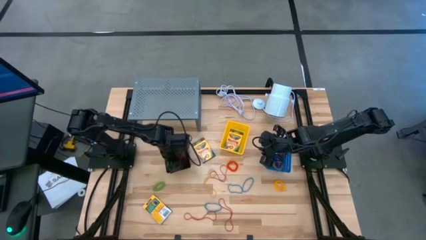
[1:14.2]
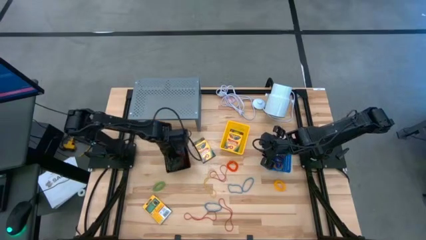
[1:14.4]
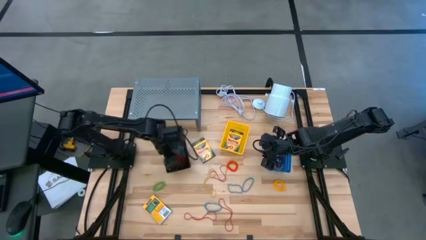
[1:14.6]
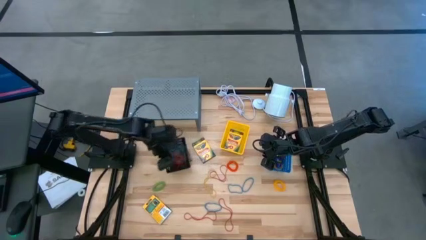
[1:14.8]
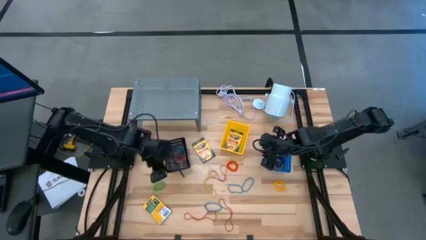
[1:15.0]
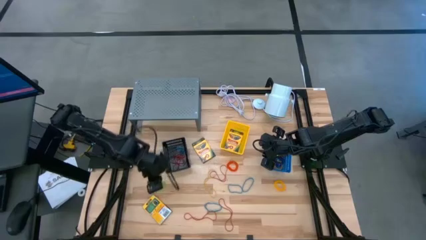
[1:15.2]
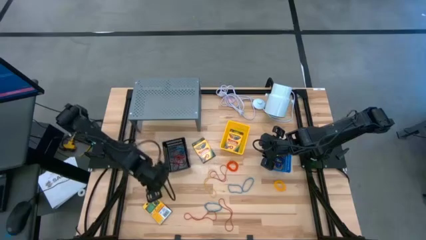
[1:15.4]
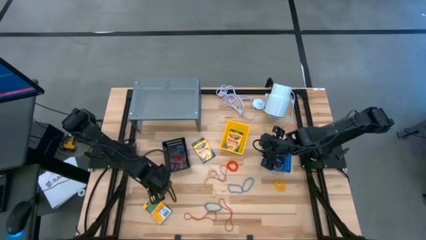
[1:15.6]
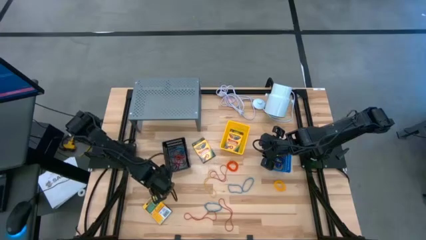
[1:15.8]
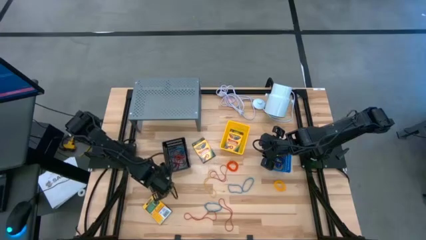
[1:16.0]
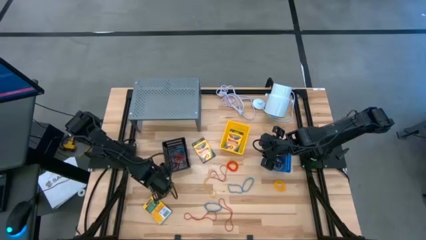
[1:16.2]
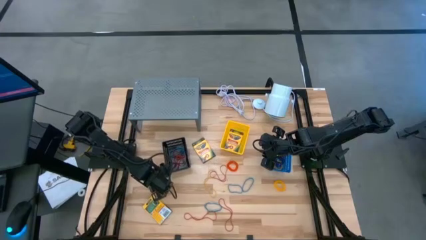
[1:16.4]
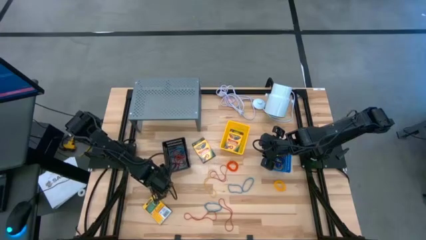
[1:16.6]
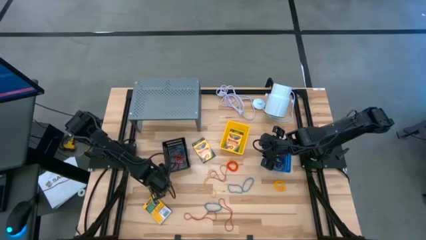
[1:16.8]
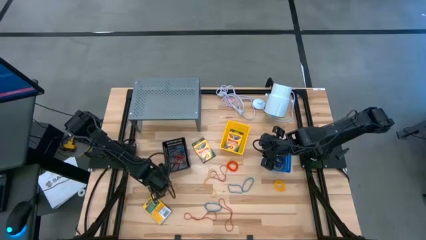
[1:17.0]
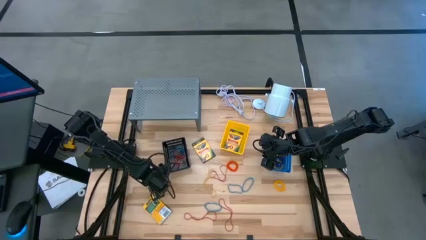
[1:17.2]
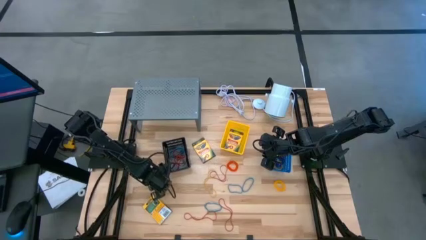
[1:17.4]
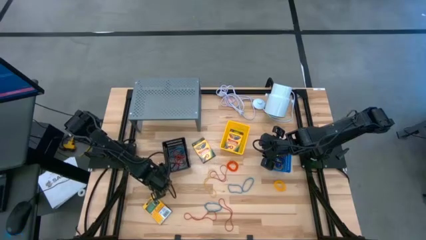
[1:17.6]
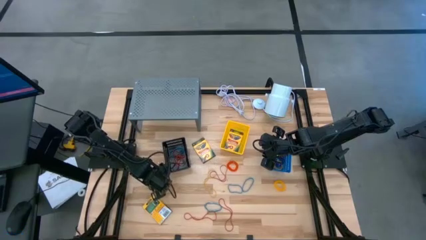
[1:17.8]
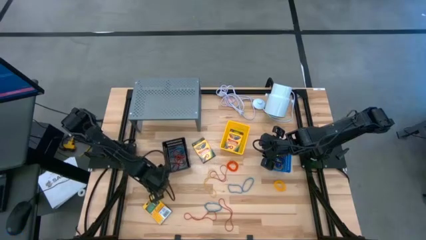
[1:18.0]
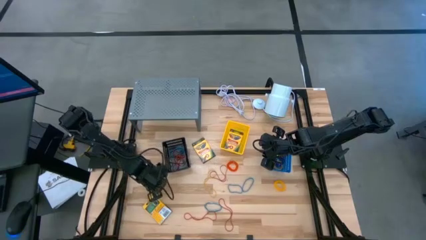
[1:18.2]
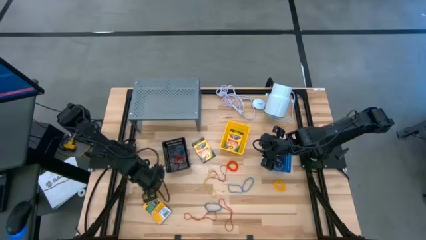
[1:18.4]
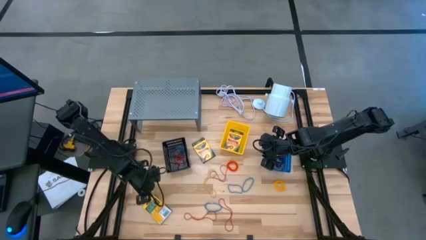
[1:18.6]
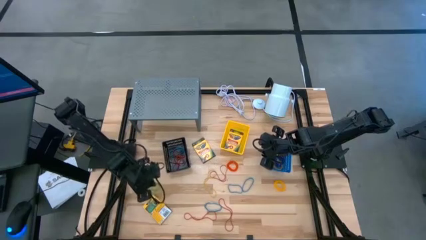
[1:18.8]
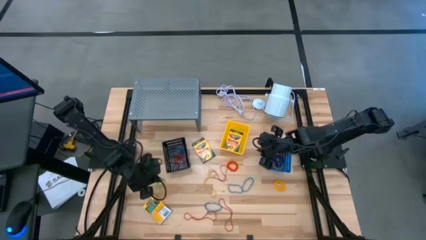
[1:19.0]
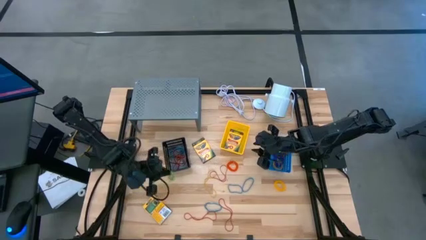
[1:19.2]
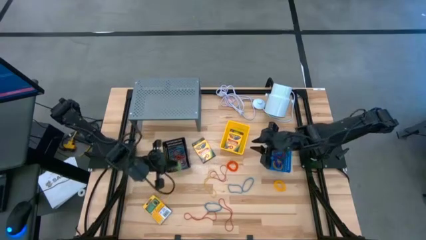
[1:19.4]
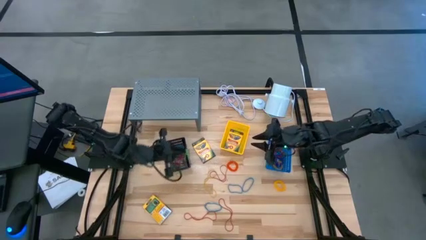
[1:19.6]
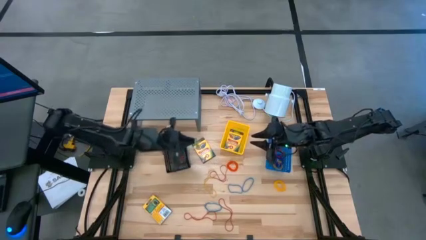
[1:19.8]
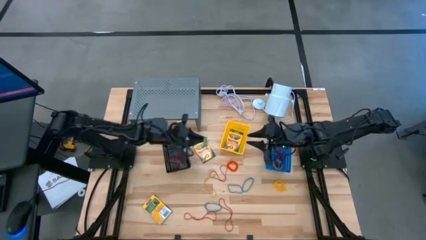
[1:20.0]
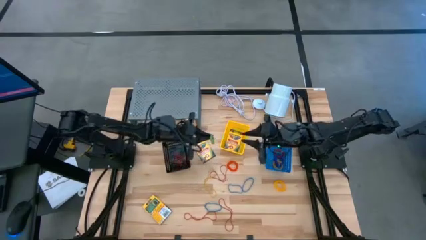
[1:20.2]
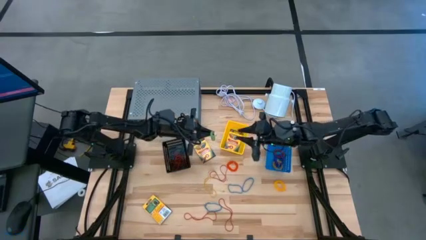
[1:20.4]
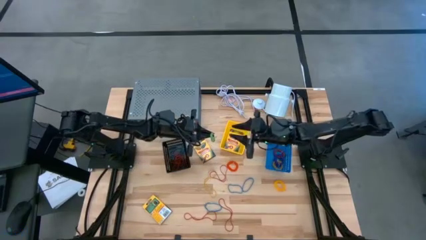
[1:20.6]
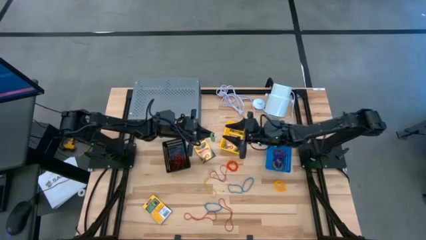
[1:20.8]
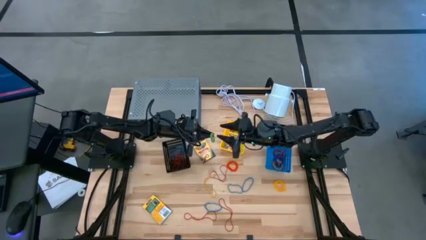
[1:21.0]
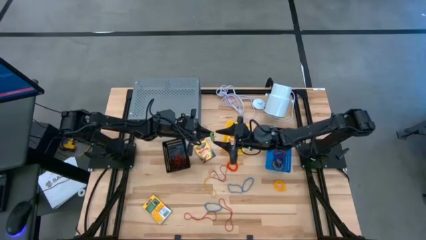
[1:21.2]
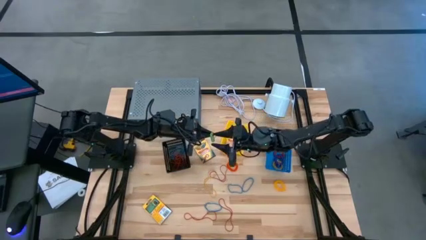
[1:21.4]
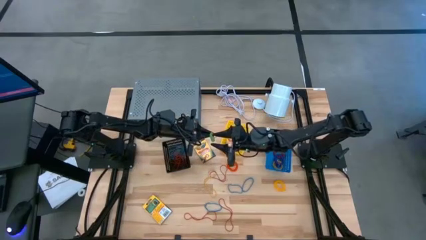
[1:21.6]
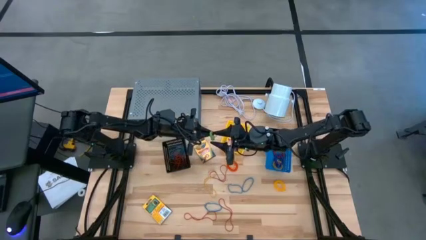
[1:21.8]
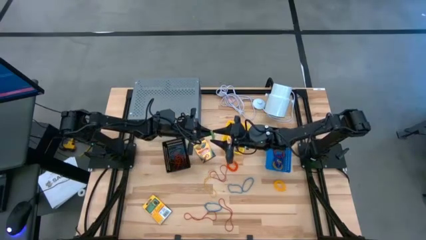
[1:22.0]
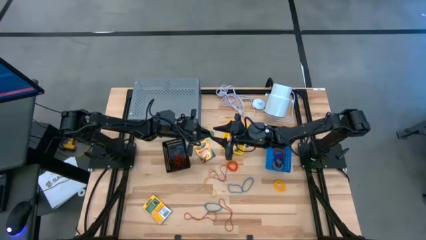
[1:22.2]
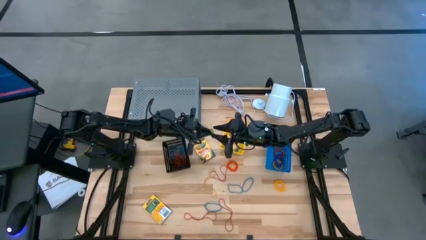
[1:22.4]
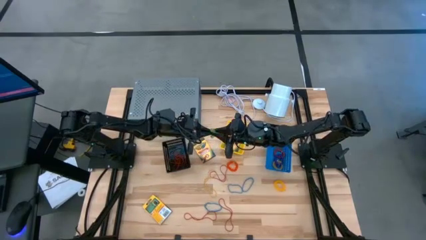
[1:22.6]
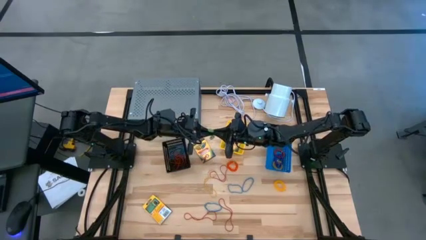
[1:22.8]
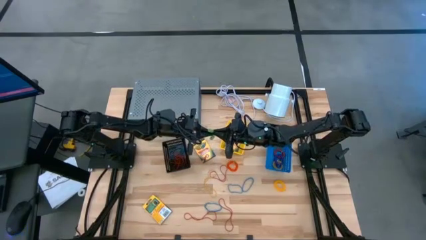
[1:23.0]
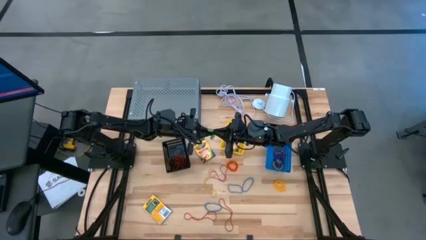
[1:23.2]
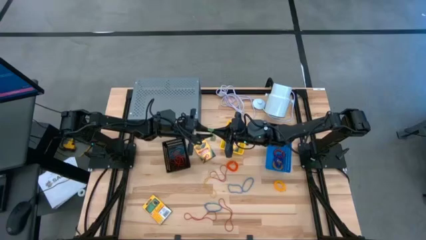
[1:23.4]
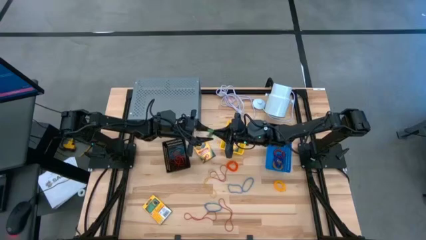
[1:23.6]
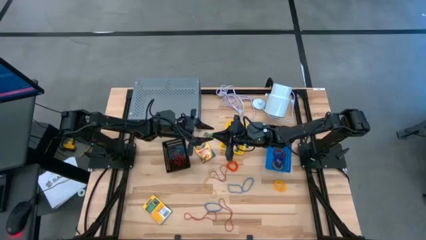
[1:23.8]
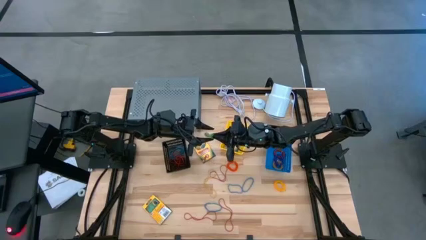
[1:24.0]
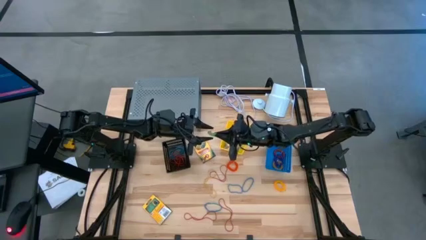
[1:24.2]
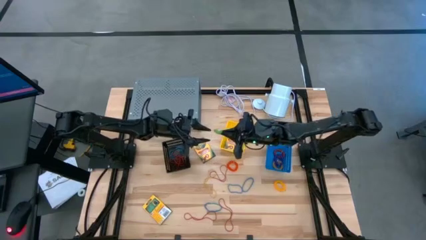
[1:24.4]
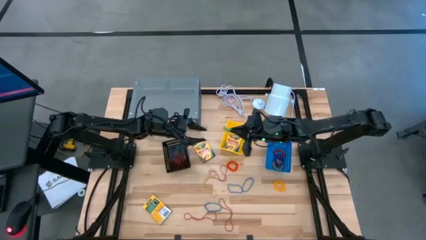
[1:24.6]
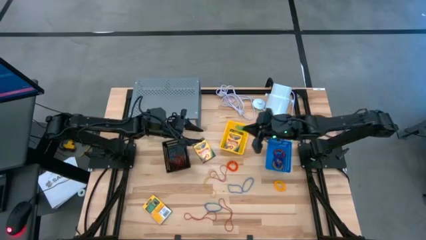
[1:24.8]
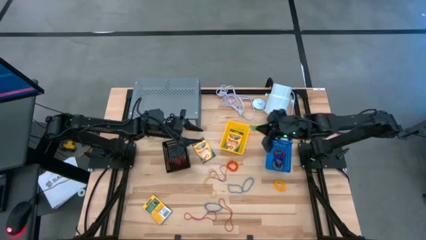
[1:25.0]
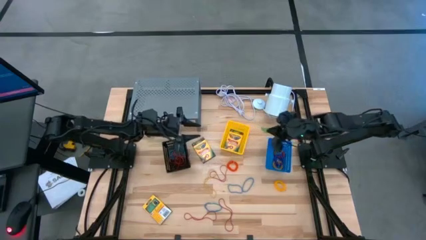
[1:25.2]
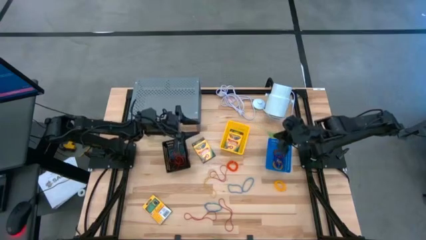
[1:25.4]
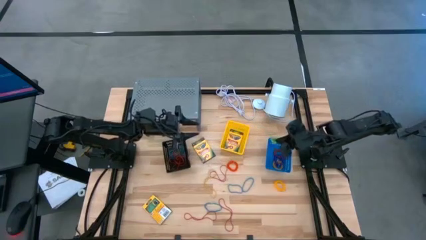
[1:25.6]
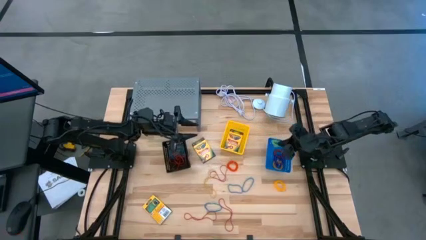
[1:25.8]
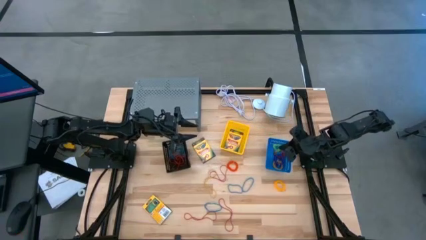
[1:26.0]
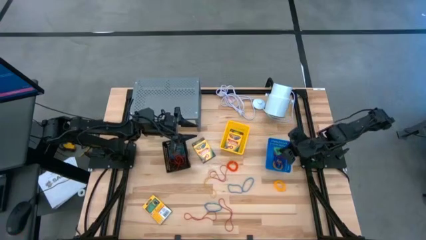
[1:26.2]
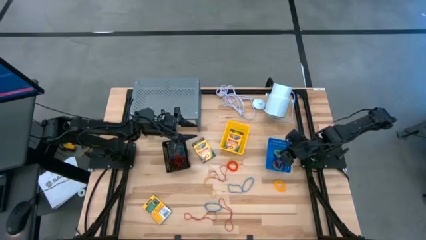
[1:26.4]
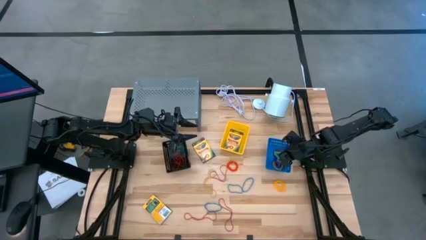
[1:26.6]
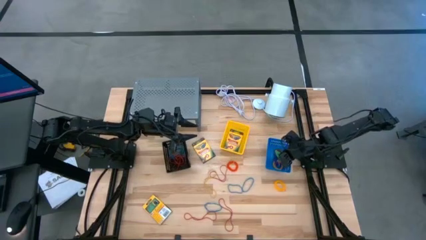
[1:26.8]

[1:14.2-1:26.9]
Task: Pick & Place Office Desk Supplies
Put the green spring keychain into the blue bin
